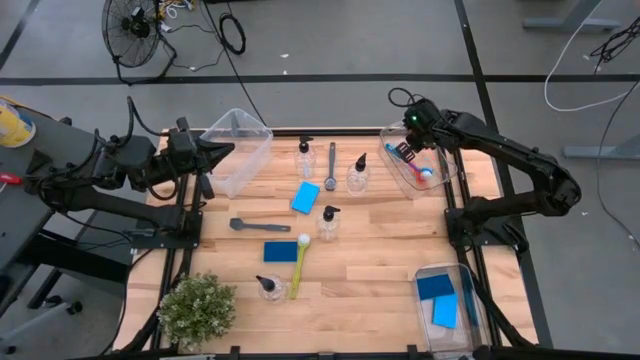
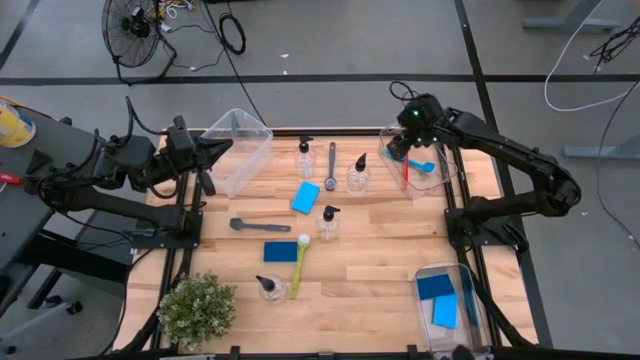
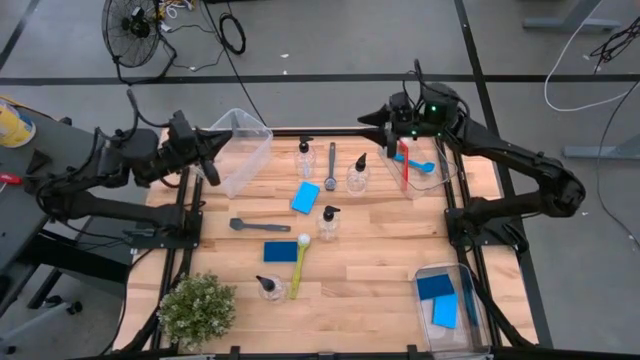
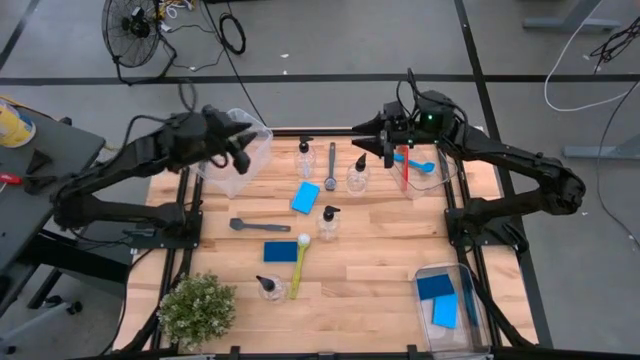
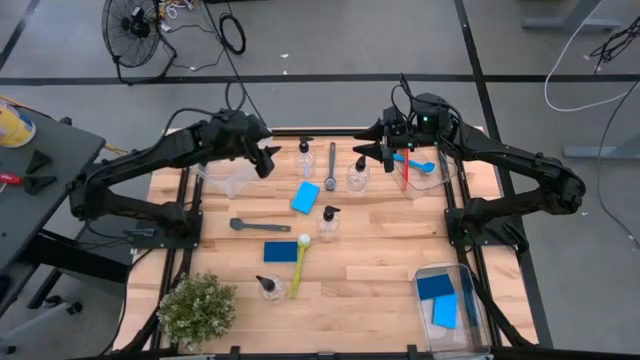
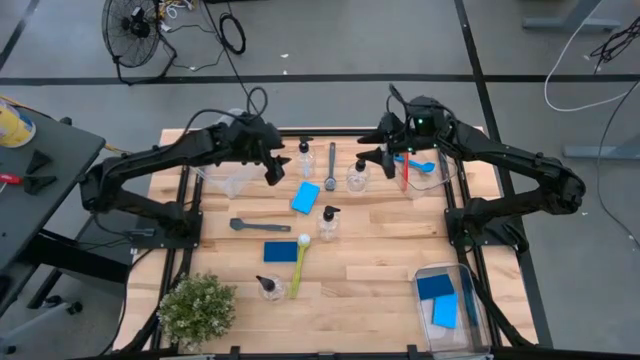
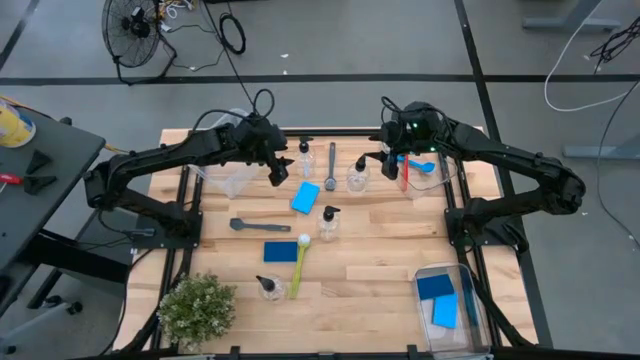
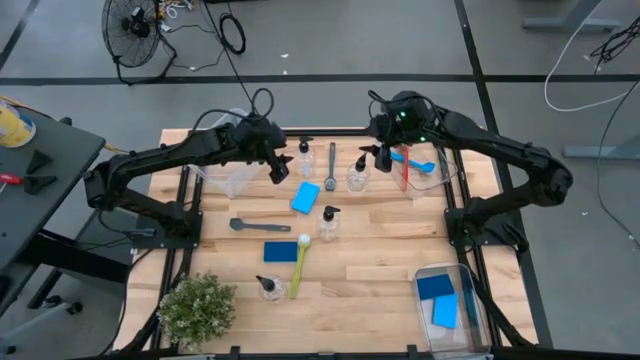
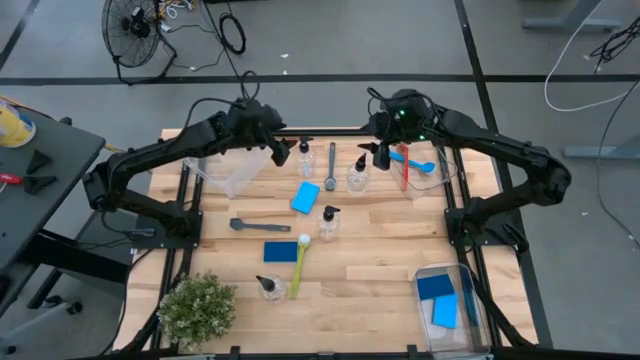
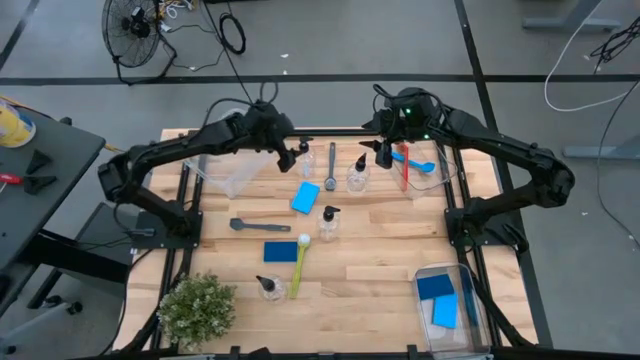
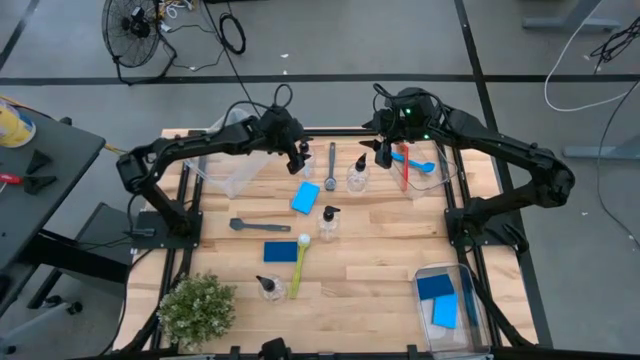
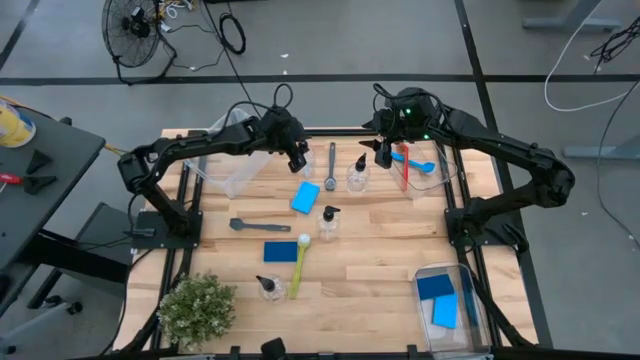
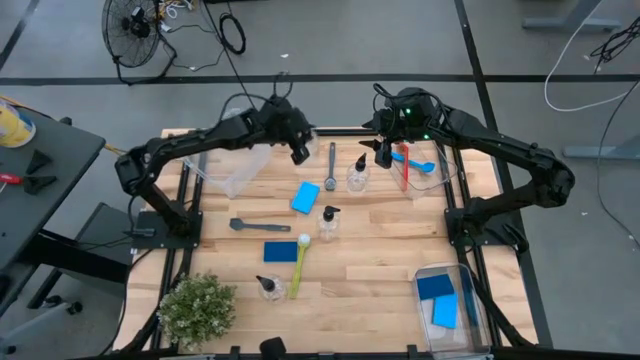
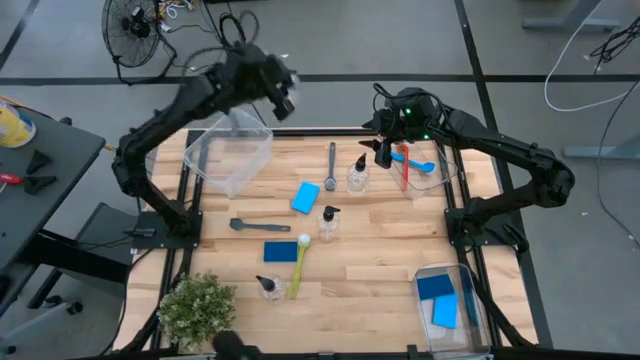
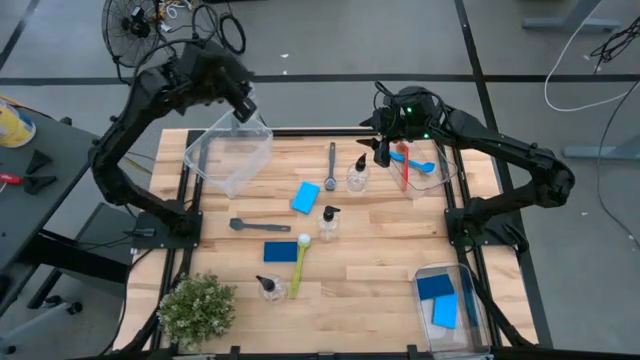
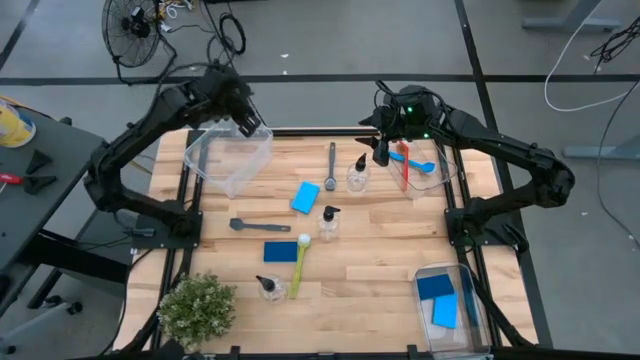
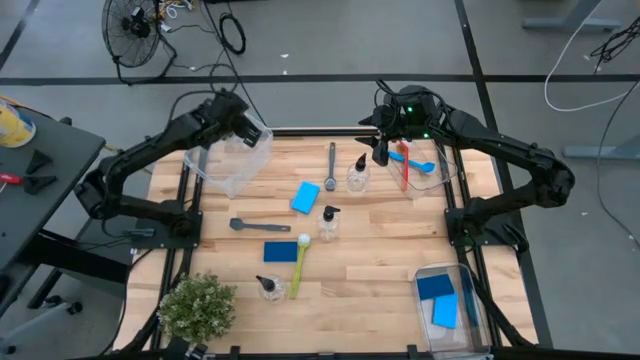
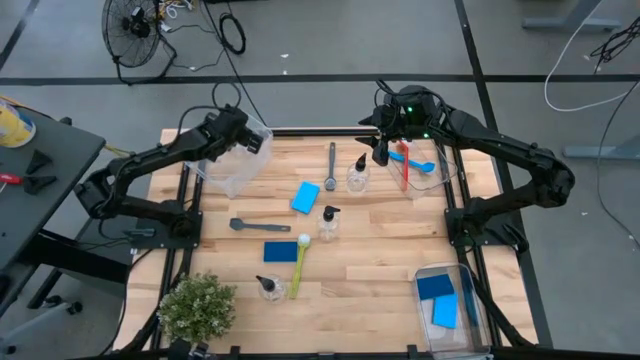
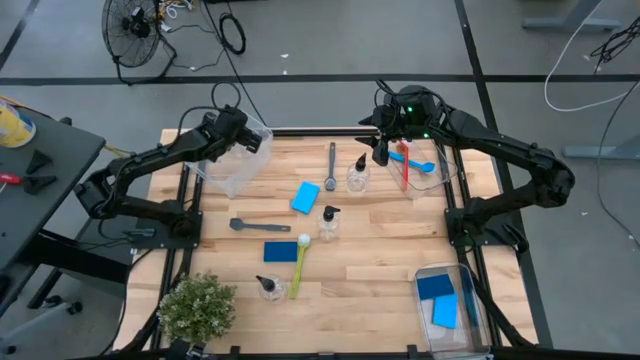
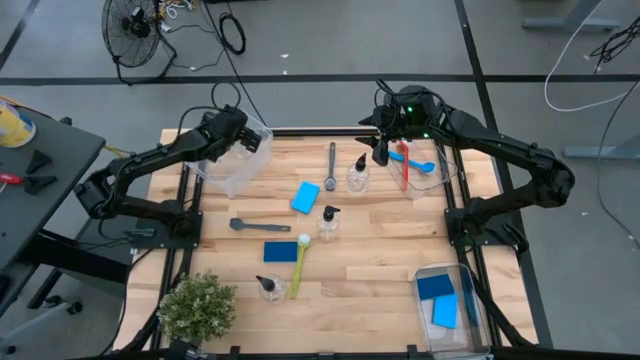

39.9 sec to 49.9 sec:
Task: Pick & Place Kitchen Sink Supplies
Put the transparent bottle spray into the transparent container

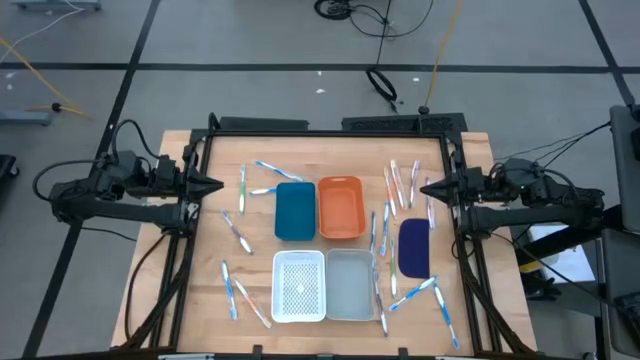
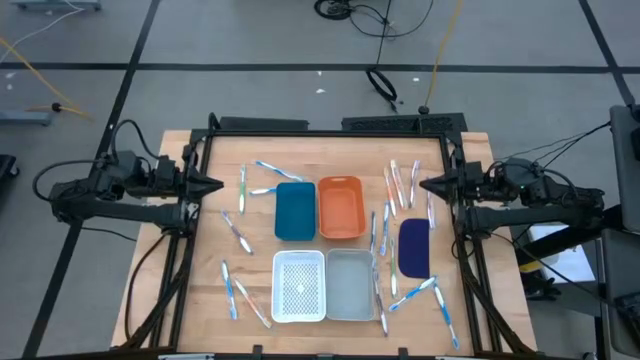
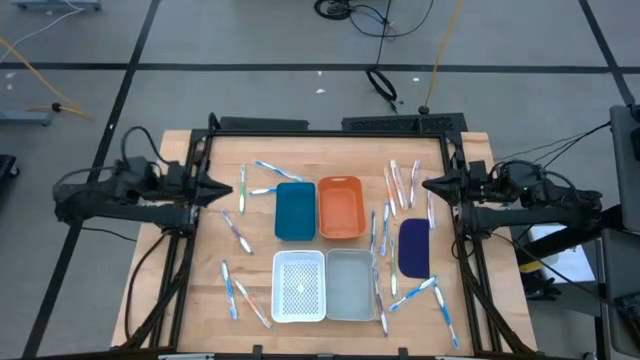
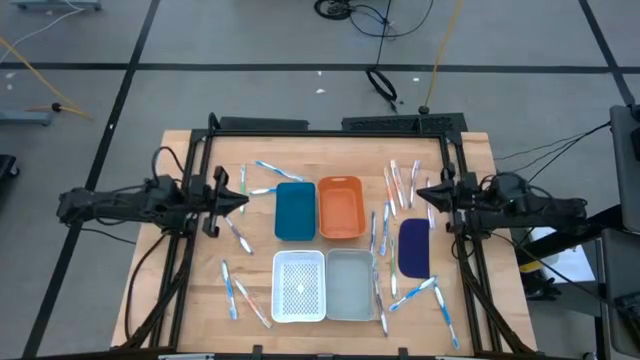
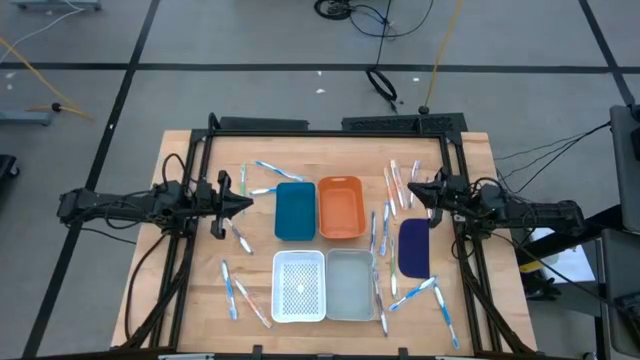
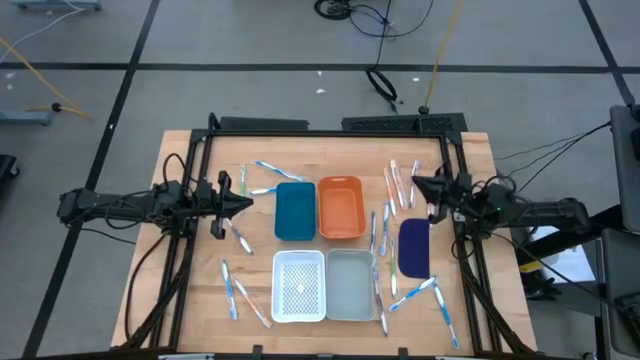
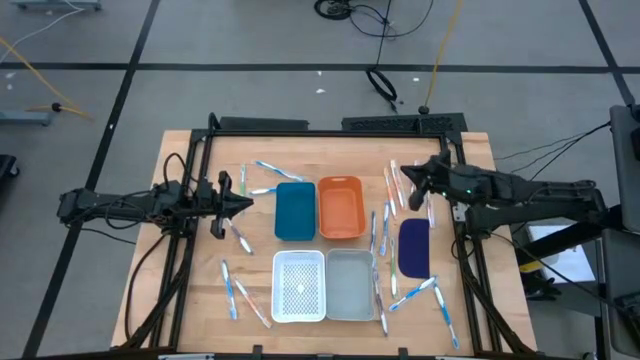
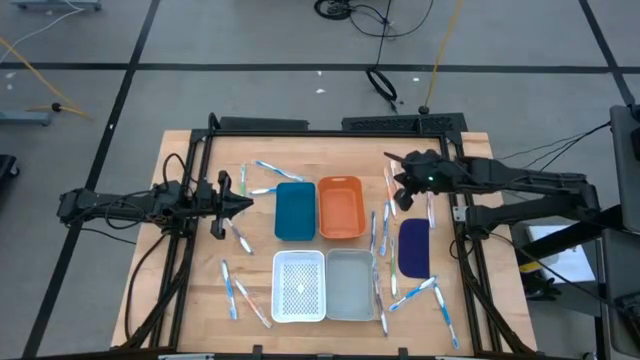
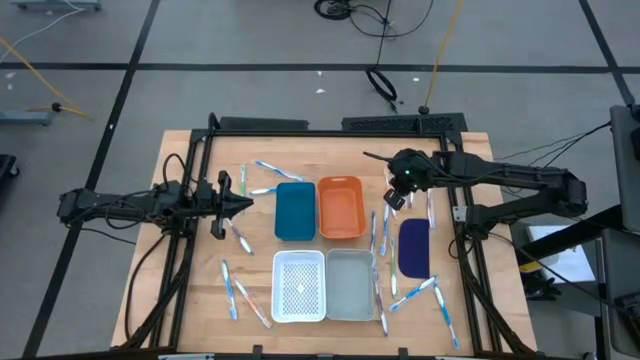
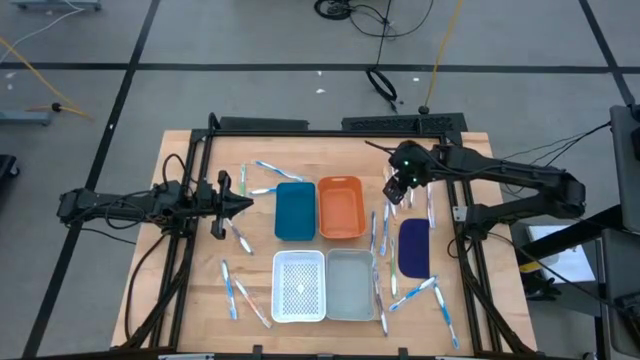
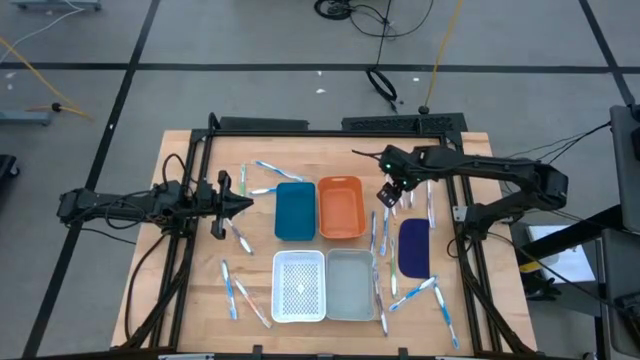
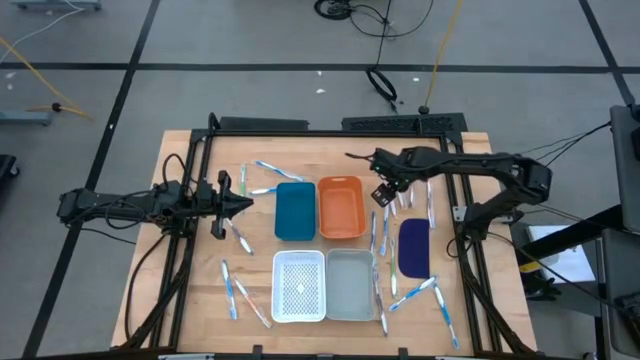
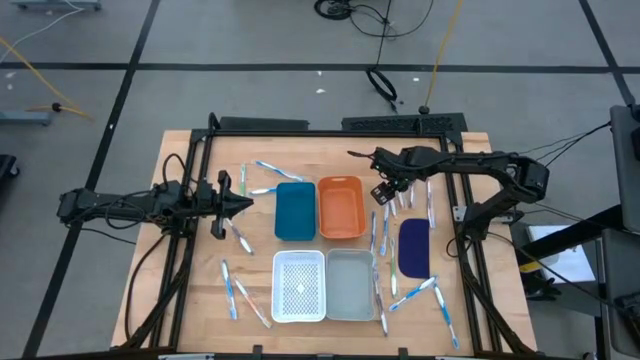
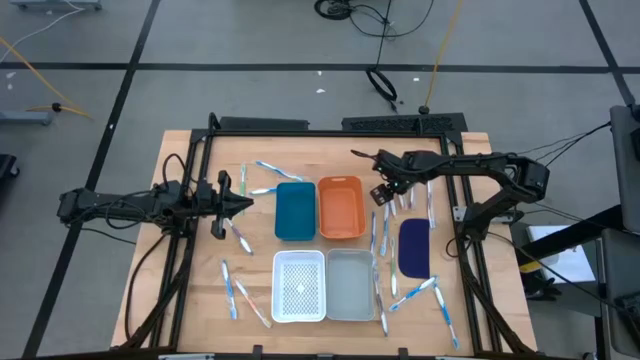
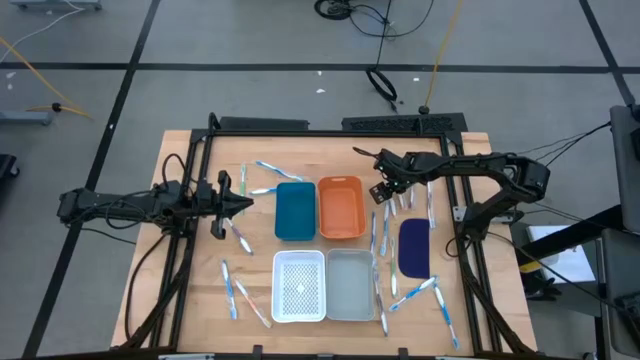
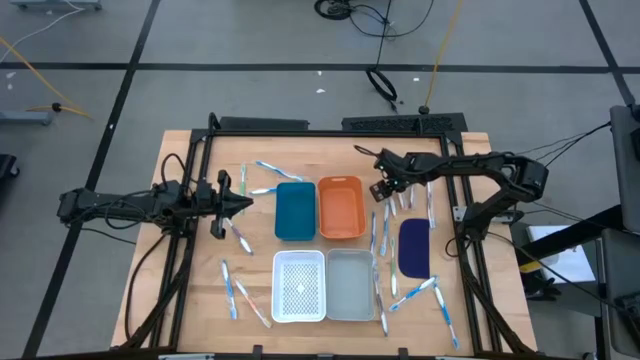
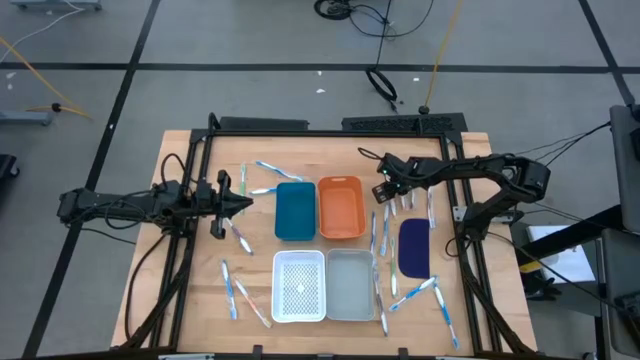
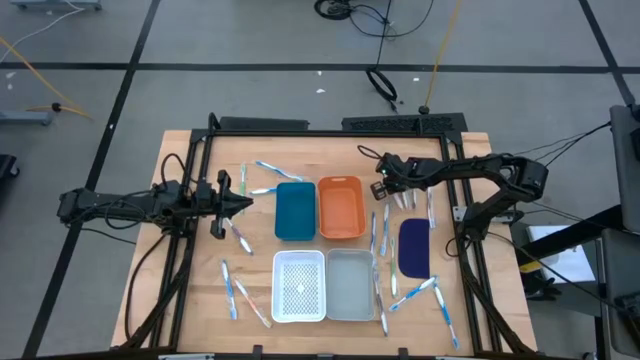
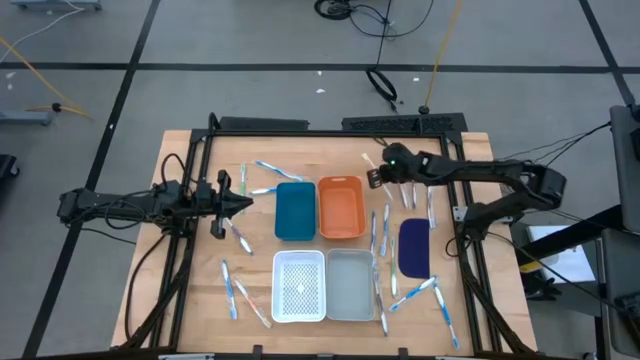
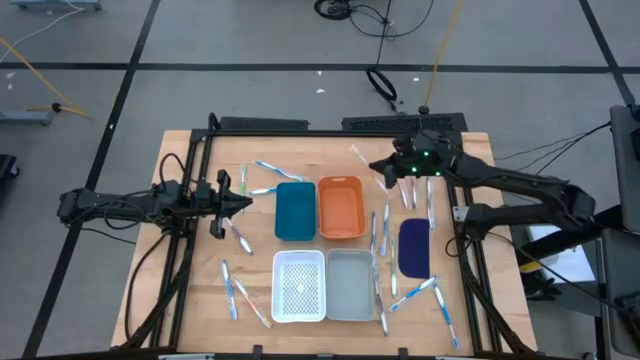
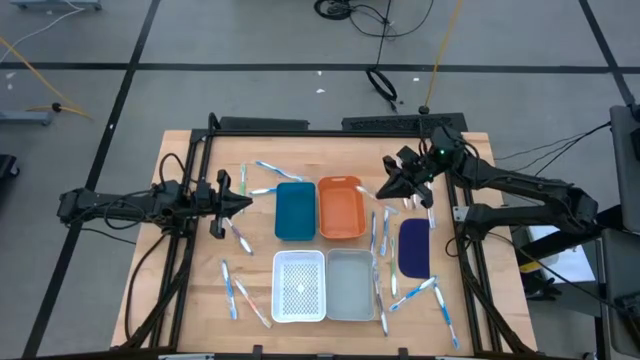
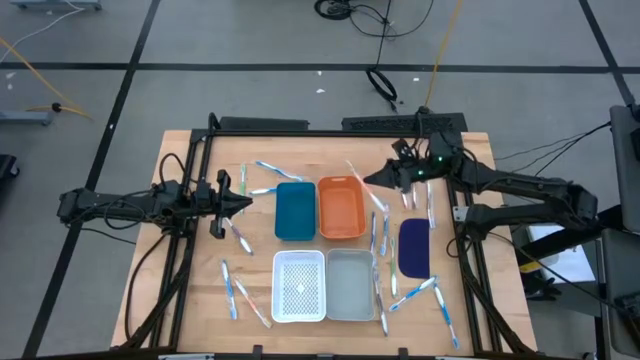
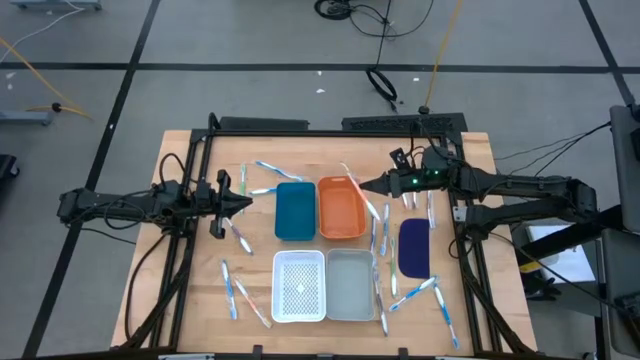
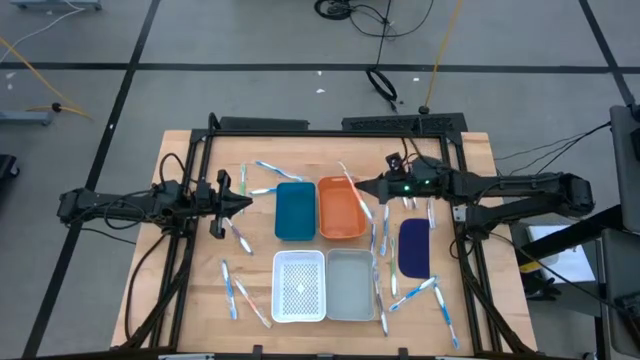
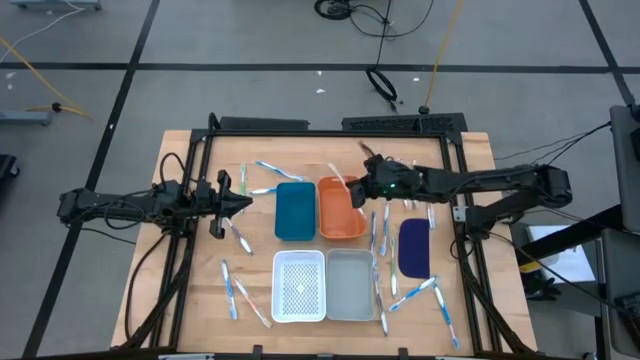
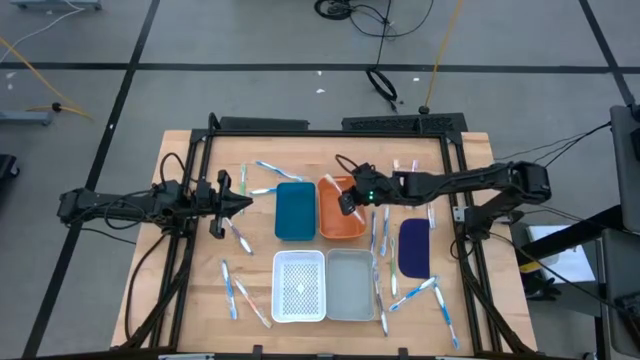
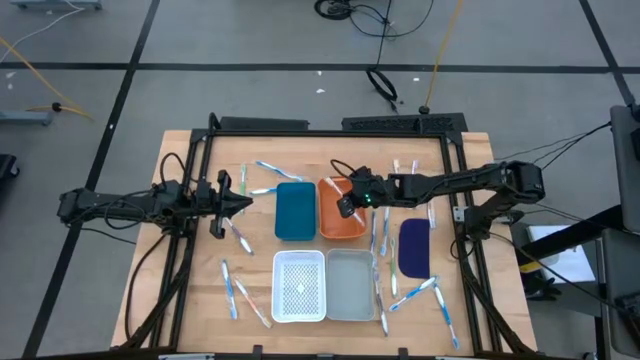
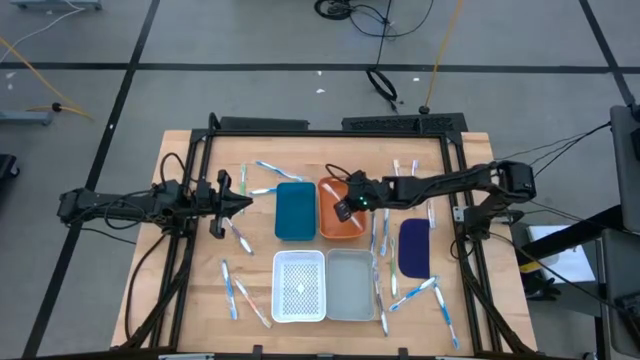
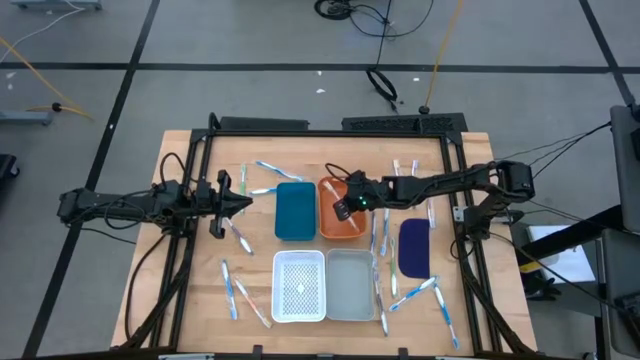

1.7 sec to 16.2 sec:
Task: Pick & Place Toothbrushes
Put the orange toothbrush into the orange bin
